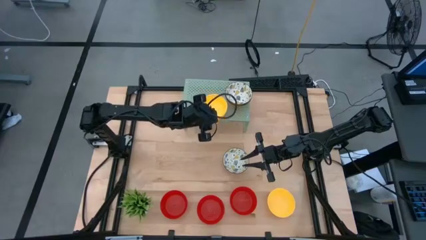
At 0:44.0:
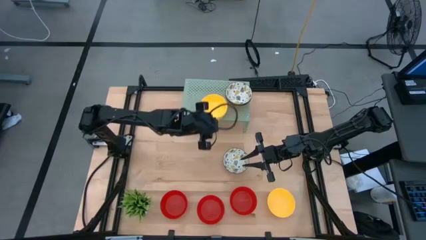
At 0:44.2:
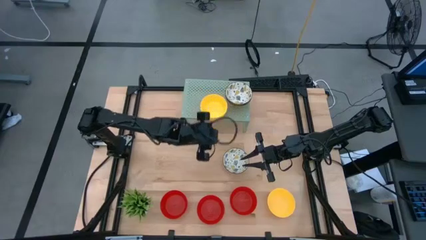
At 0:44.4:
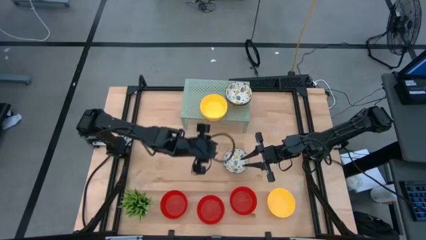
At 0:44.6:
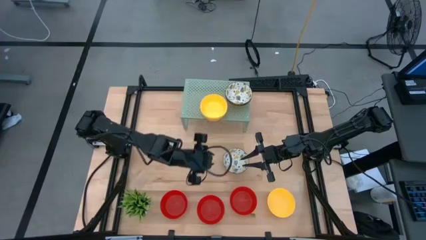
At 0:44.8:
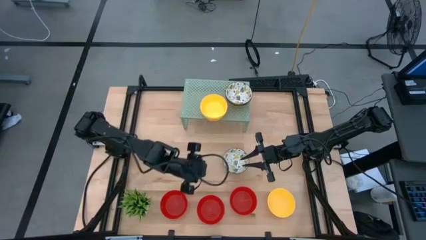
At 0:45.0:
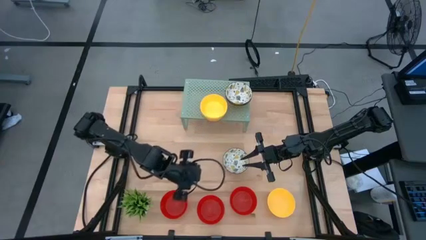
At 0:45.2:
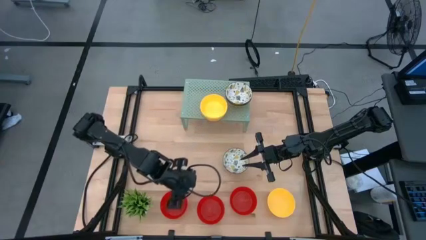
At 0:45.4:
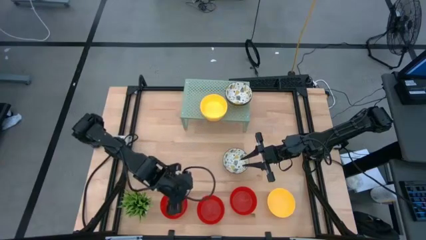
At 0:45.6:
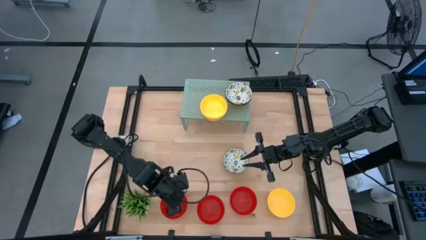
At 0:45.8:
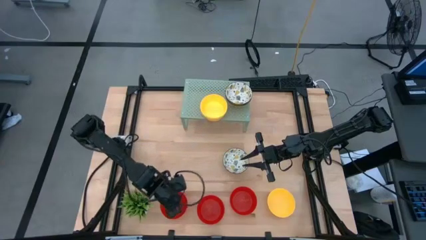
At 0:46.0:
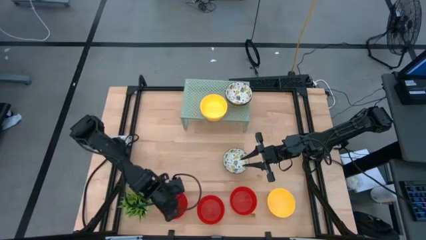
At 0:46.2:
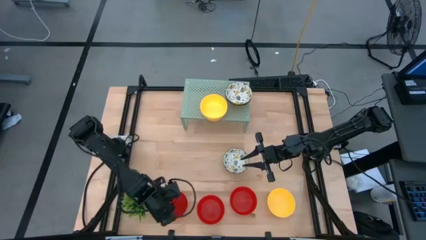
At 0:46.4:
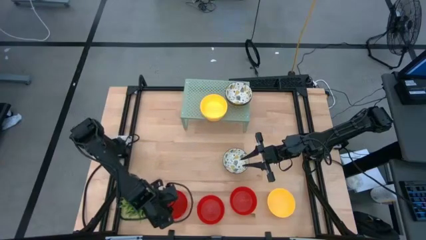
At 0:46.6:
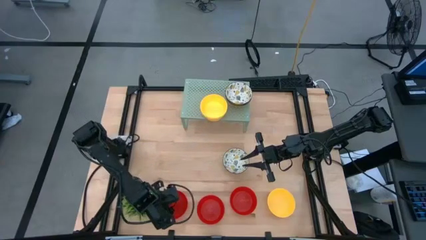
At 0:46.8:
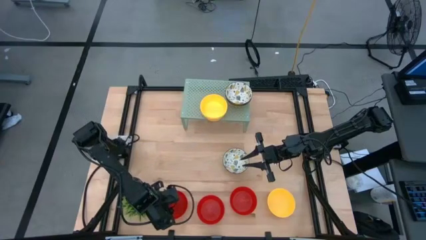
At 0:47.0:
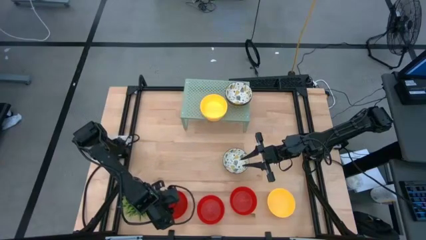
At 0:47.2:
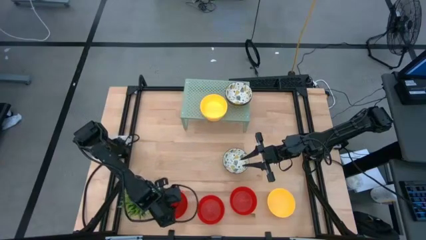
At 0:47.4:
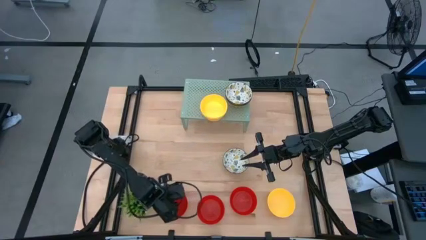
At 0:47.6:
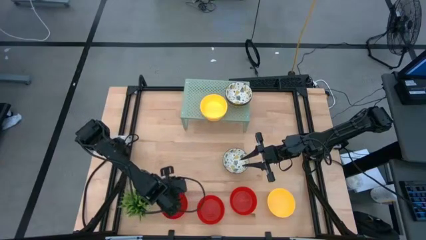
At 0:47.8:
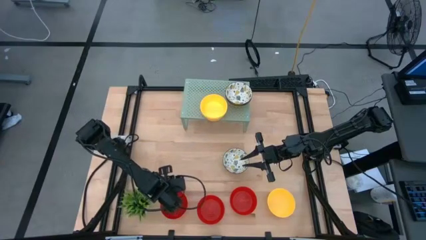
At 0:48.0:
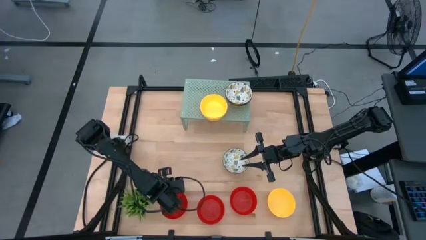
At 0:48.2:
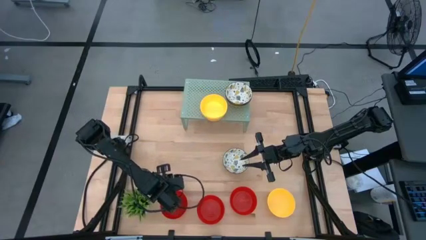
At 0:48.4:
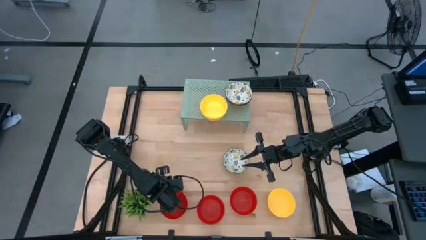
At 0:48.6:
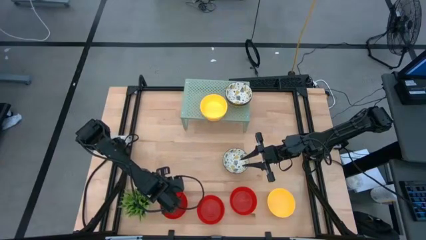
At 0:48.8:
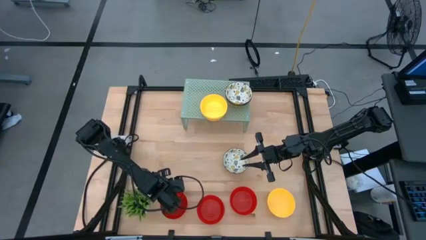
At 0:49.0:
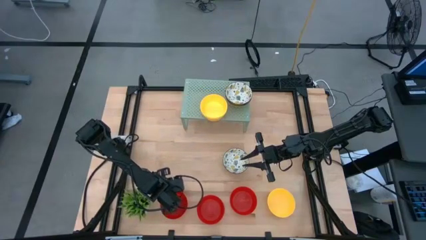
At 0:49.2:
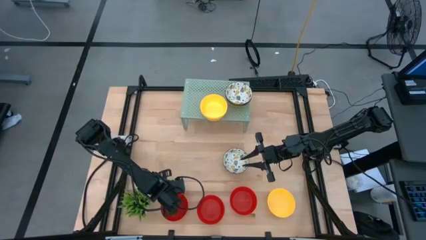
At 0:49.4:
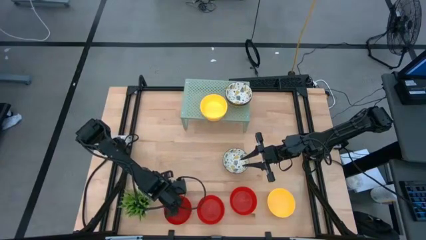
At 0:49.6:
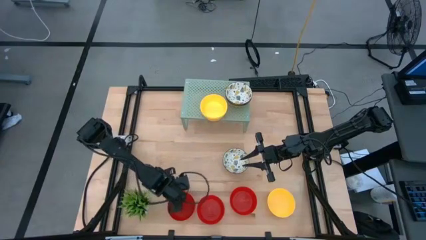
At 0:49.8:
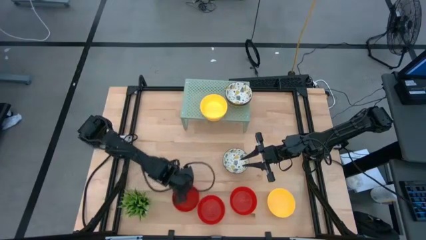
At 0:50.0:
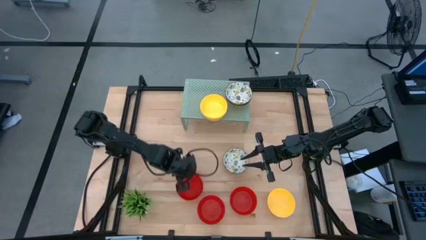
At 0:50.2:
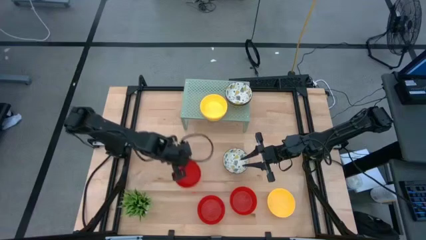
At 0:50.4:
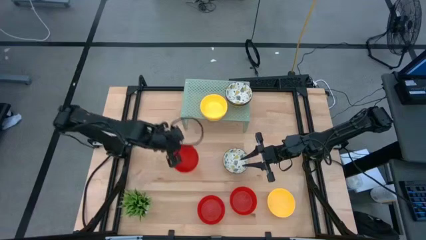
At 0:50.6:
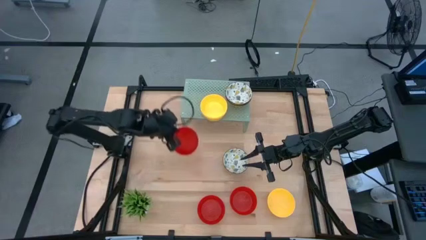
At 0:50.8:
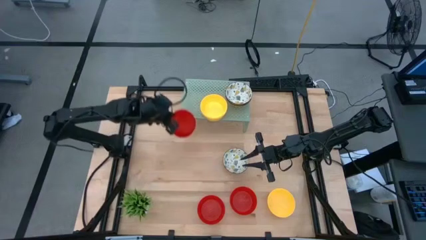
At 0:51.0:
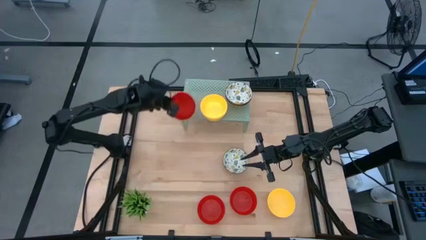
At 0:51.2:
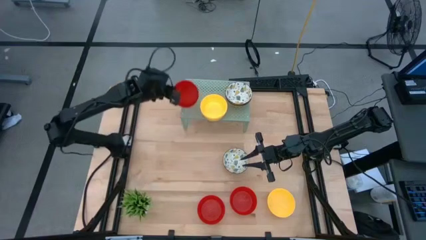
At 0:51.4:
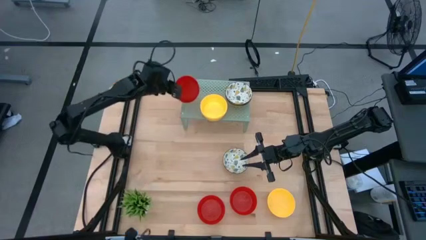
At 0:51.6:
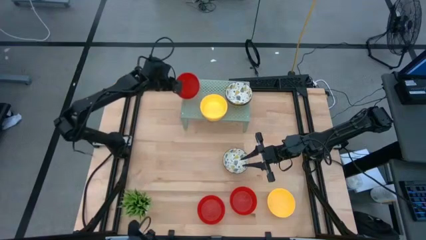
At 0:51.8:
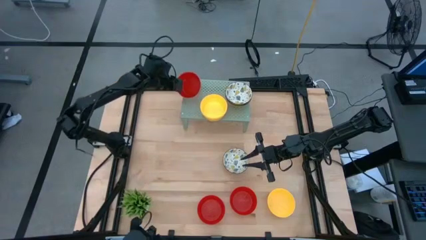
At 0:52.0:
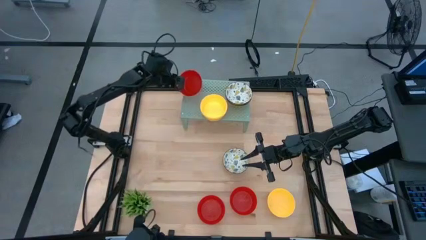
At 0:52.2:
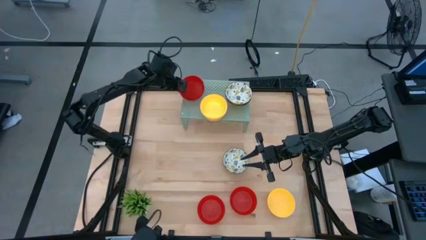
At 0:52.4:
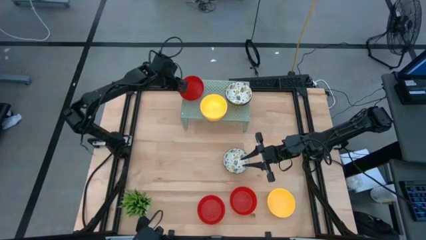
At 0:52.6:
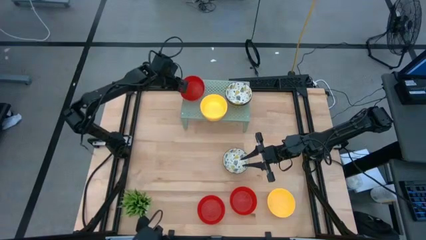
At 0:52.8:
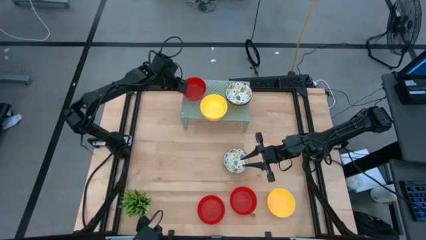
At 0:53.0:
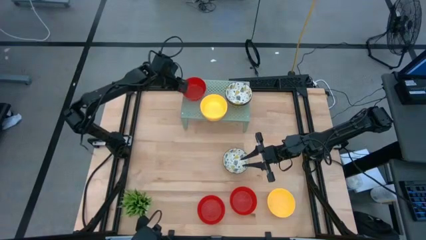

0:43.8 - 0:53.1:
Task: Pick & Place Mini bowls
Put the red bowl on the shelf

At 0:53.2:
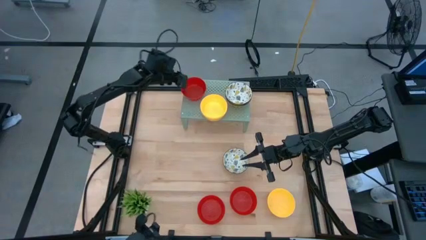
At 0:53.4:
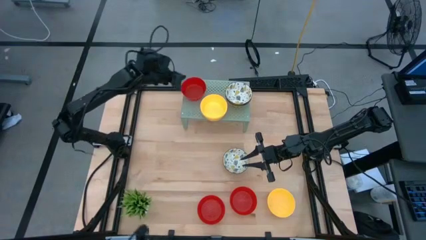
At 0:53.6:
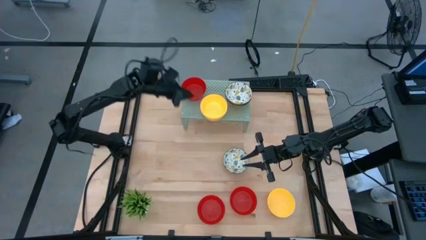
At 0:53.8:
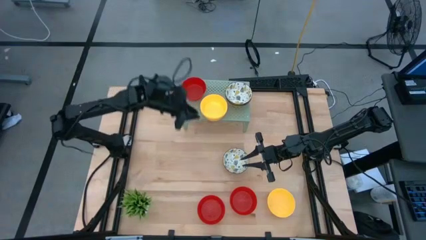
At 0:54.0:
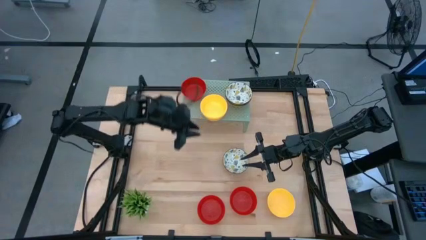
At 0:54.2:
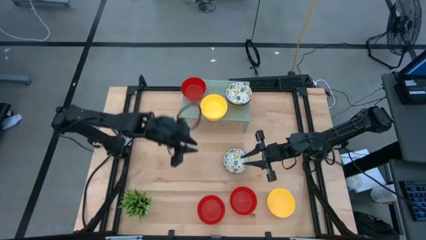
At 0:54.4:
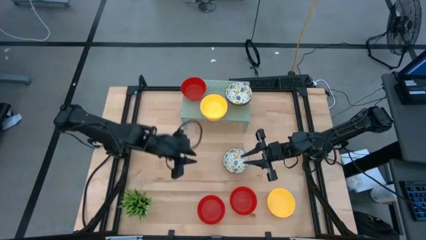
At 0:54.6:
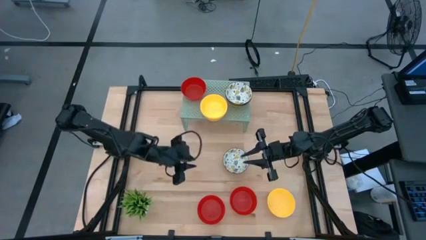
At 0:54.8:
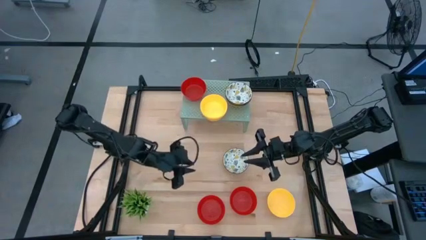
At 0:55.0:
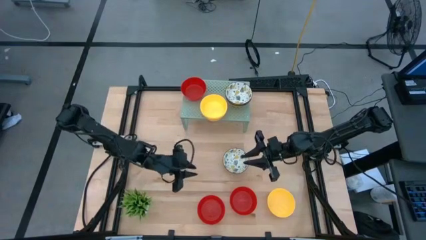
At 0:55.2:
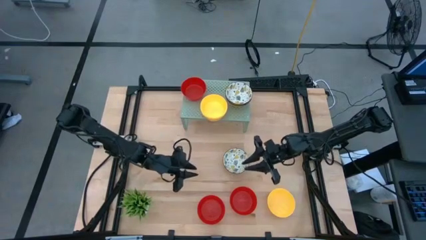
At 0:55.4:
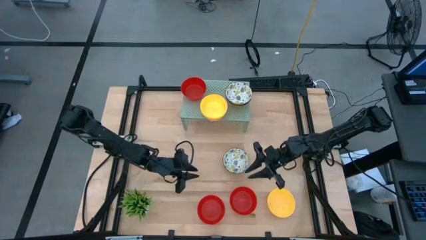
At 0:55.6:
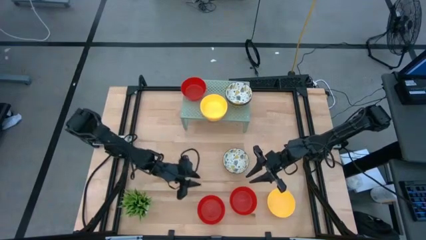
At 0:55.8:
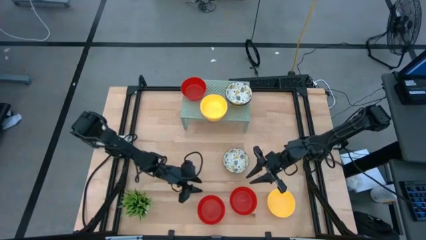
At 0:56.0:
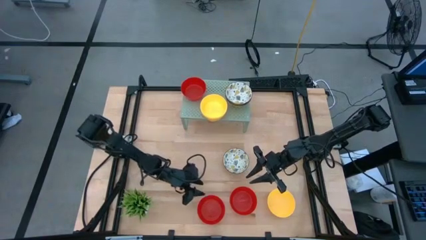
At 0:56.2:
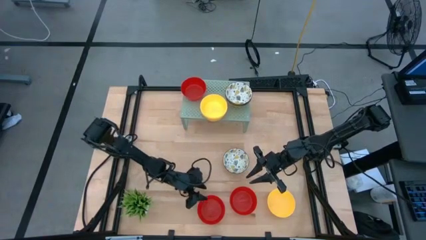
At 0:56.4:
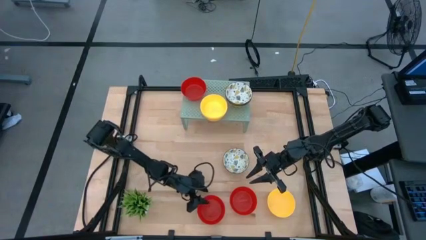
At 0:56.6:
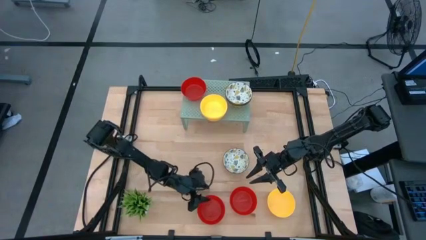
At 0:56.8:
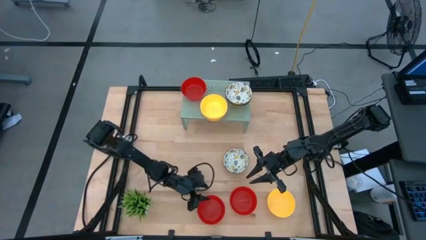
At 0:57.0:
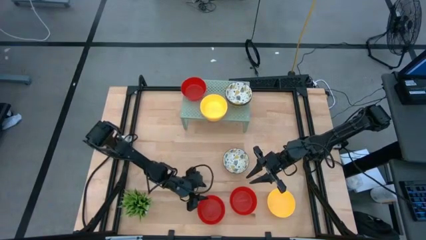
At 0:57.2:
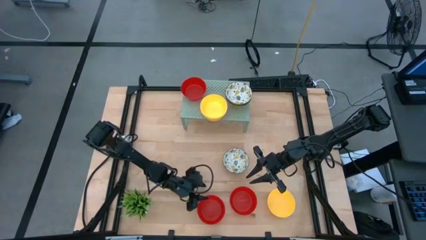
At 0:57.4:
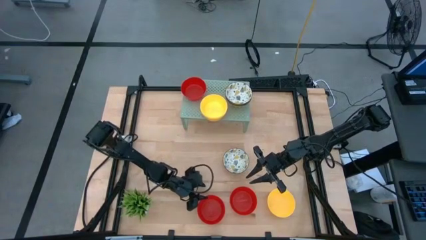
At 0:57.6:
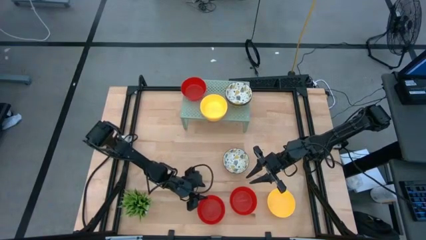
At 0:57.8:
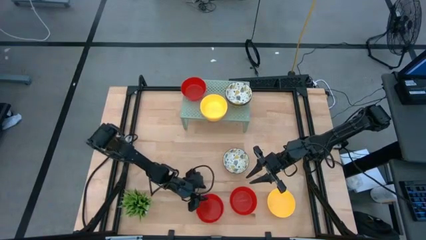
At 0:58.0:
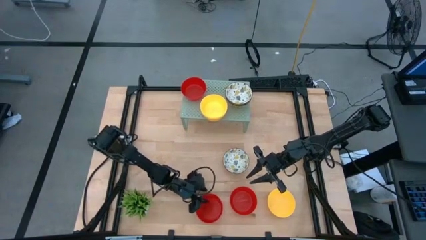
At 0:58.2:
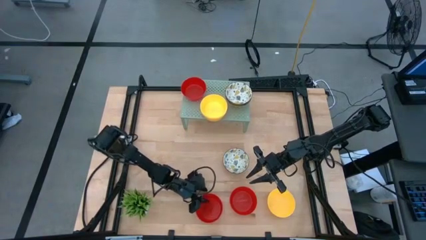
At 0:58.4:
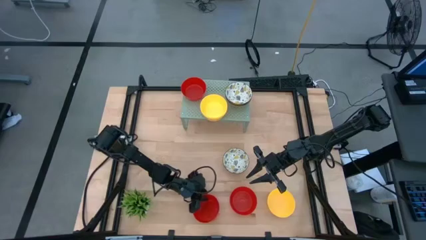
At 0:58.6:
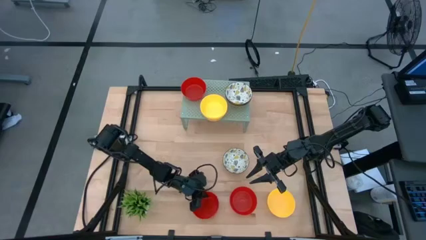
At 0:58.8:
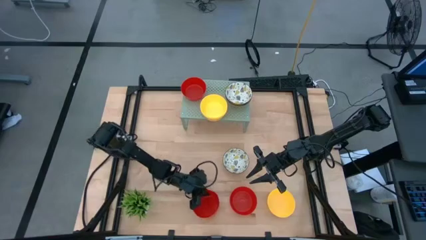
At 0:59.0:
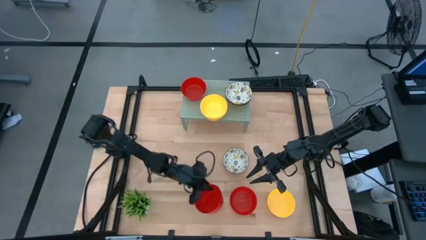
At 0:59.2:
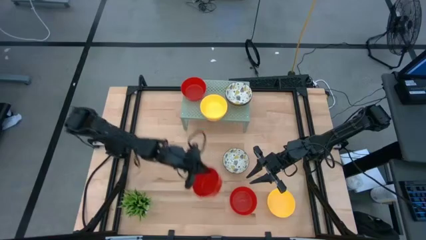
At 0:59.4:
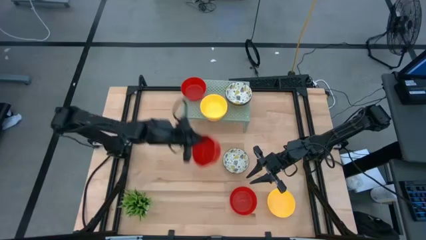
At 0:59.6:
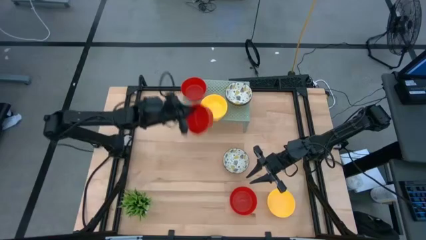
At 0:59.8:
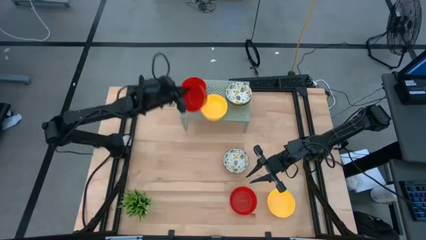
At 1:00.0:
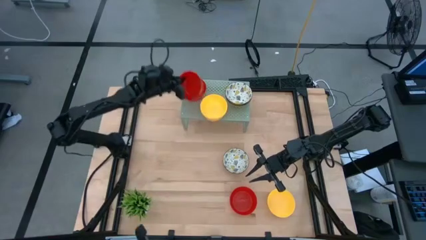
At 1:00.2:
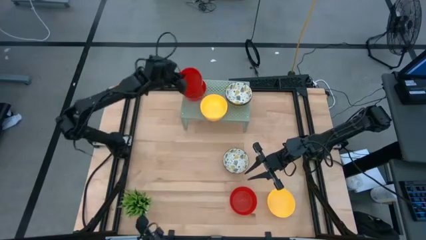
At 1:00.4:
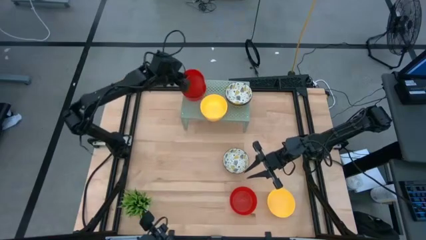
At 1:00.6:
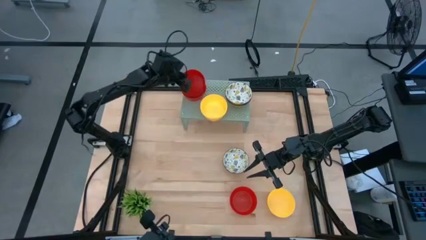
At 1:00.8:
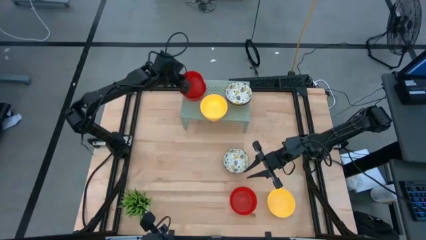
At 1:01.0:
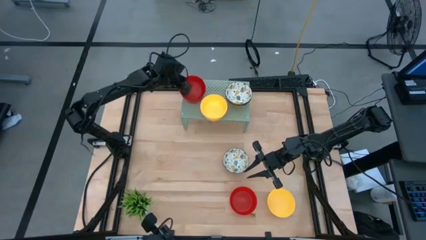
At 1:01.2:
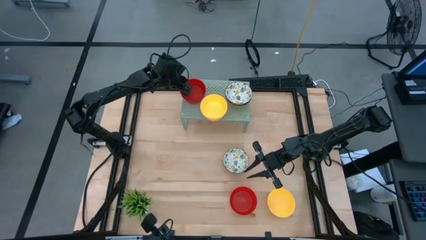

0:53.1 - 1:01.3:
Stack the red bowl on the red bowl on the shelf
